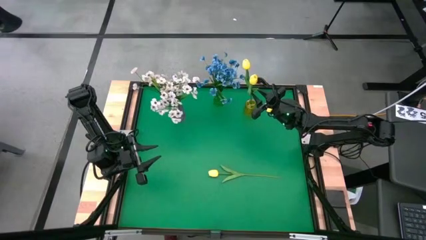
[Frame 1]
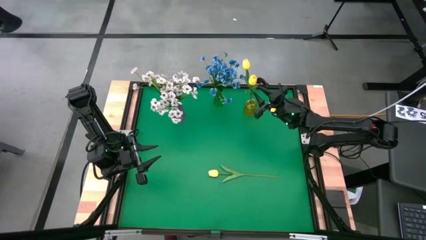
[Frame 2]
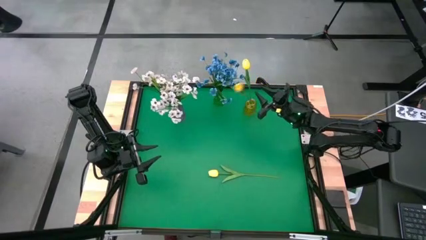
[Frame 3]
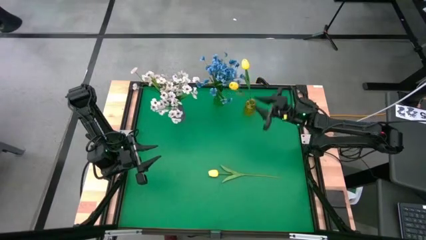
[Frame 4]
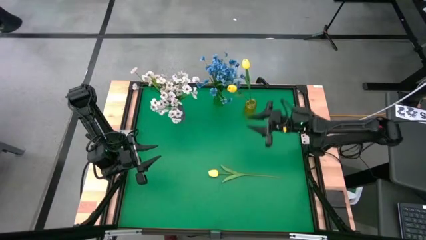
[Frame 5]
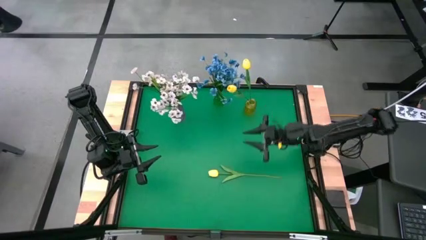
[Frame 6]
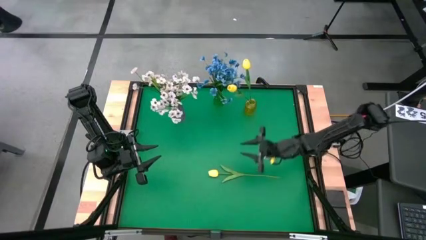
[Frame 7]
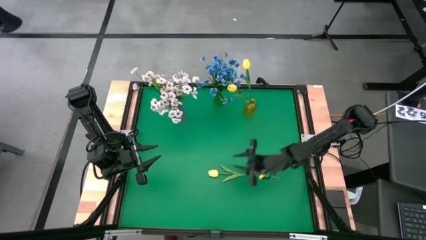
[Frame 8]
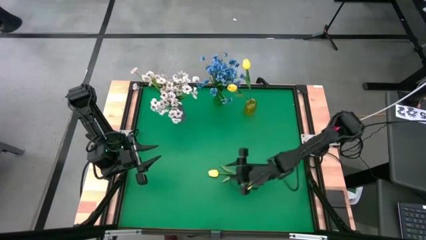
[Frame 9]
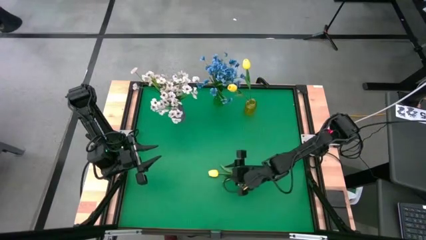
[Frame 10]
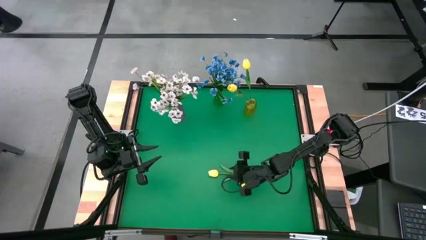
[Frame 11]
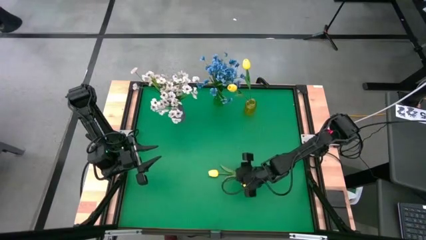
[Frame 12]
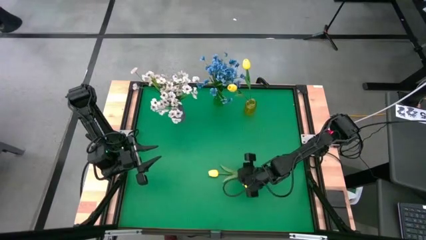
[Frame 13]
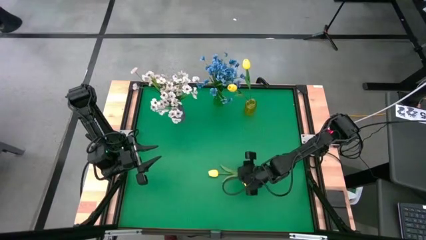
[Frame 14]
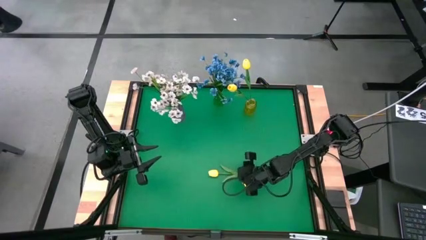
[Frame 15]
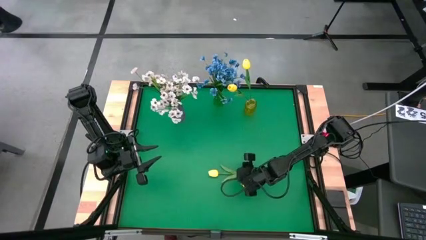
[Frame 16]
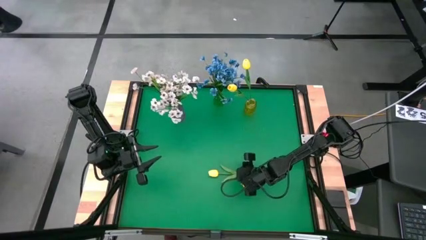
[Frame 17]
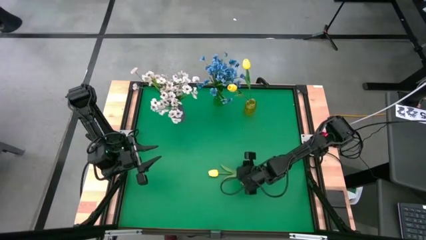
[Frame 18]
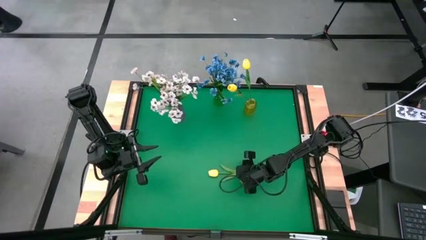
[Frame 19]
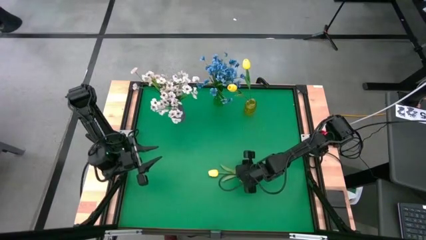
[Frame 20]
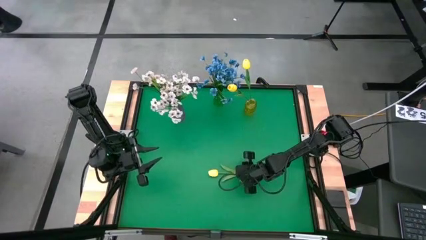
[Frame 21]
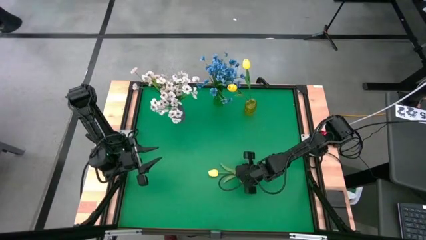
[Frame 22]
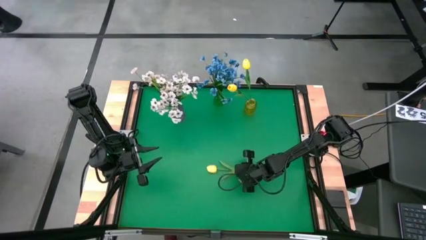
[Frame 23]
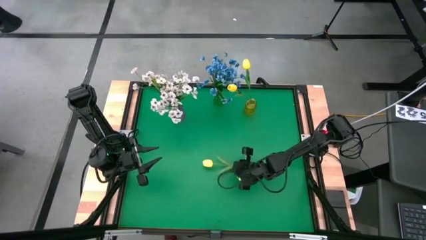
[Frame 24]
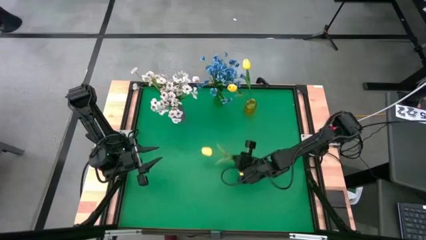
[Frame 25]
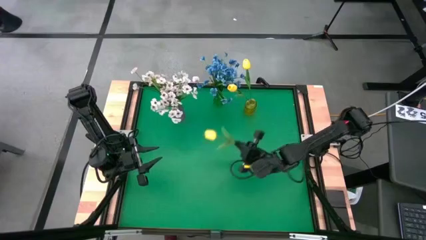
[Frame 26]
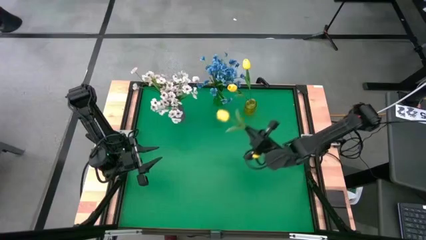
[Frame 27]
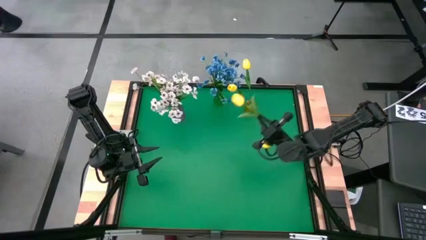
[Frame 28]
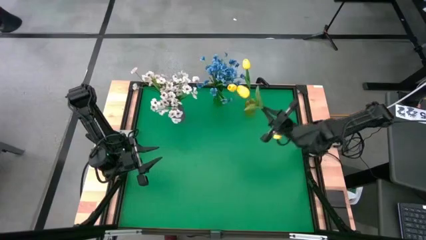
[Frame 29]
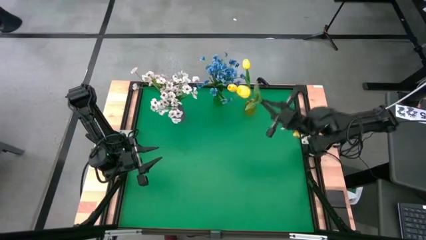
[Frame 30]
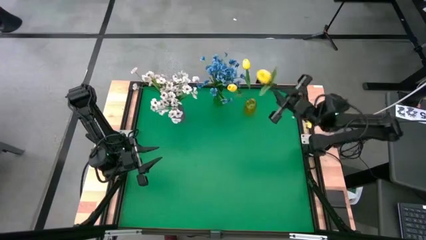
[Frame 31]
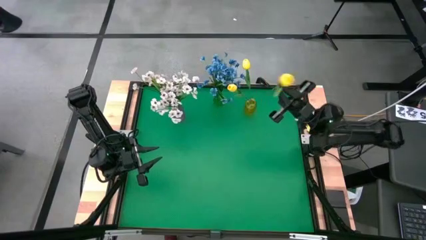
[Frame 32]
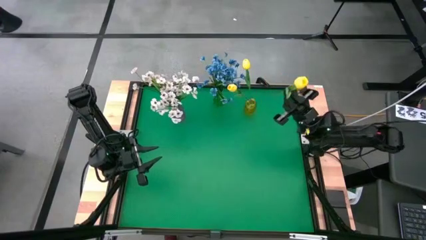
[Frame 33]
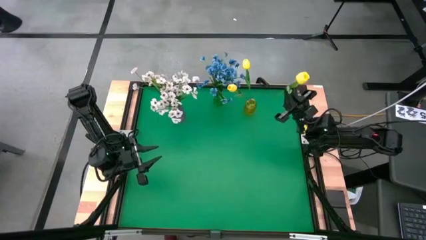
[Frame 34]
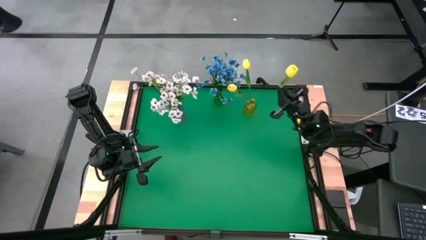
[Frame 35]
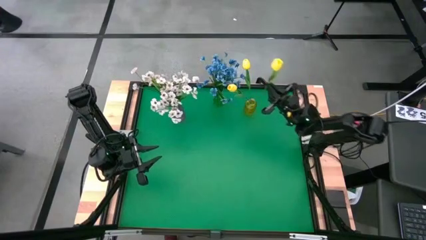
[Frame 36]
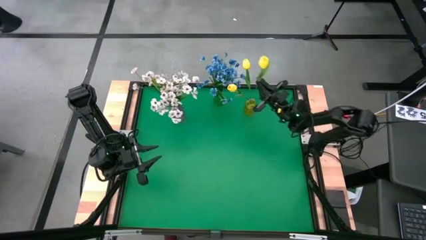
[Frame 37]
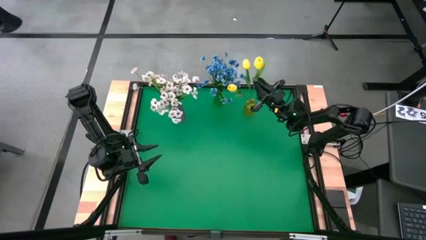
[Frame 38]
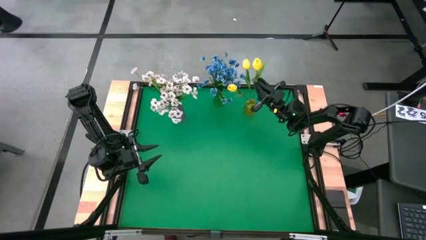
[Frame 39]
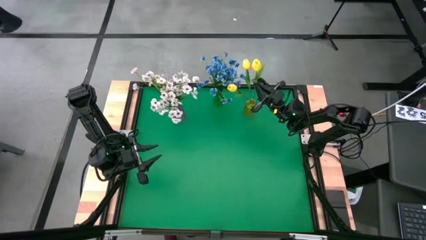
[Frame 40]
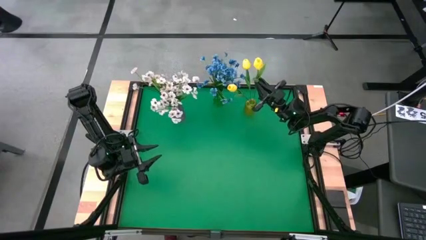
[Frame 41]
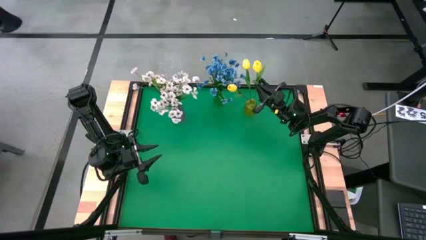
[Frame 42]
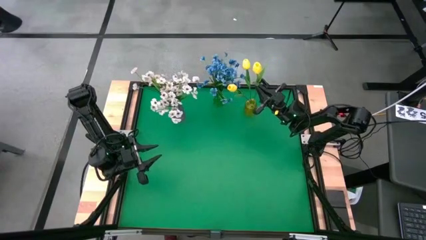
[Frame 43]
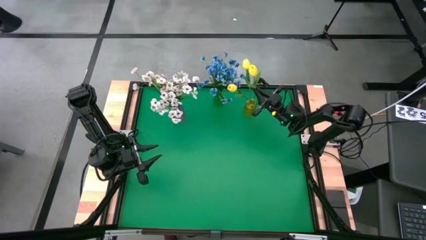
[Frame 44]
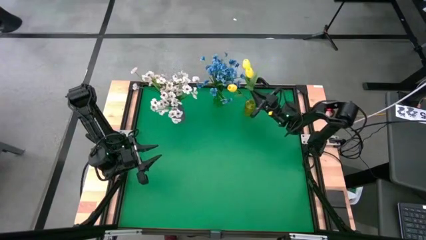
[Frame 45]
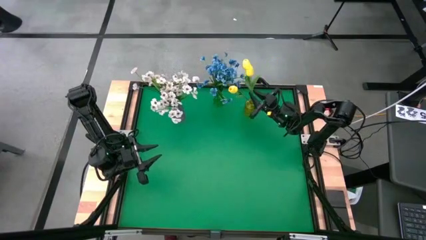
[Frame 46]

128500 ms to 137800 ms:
Task: Sort flowers into vase by color
Put the yellow flower into the yellow vase

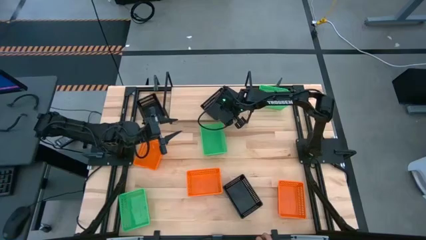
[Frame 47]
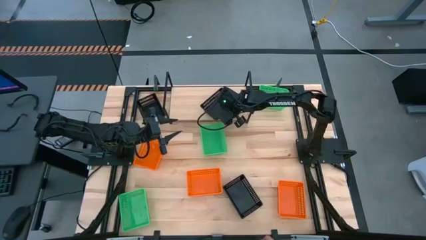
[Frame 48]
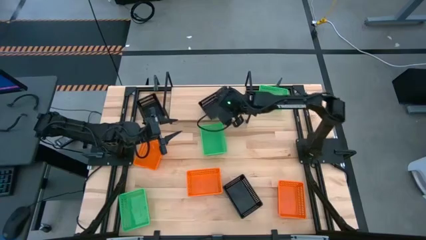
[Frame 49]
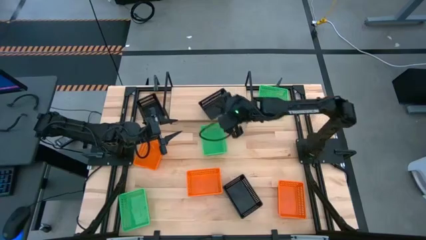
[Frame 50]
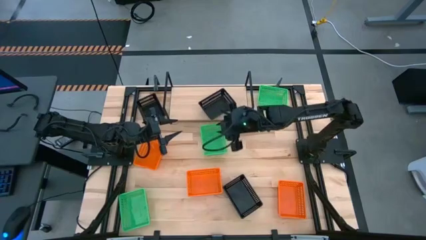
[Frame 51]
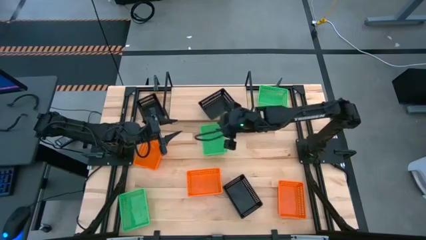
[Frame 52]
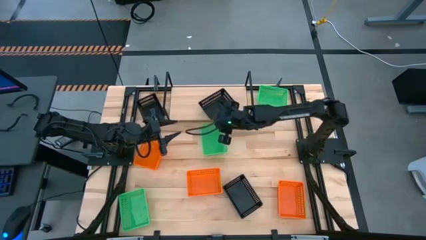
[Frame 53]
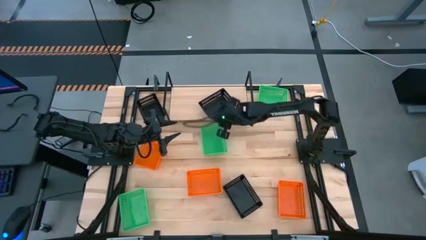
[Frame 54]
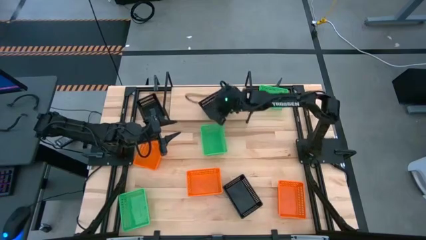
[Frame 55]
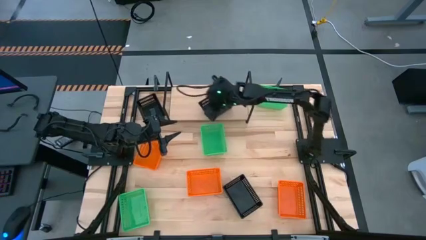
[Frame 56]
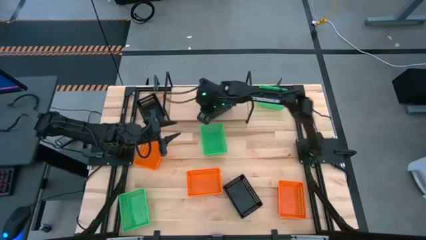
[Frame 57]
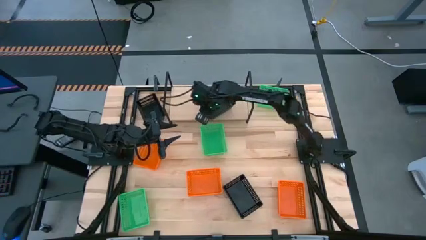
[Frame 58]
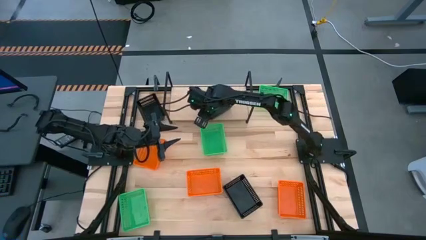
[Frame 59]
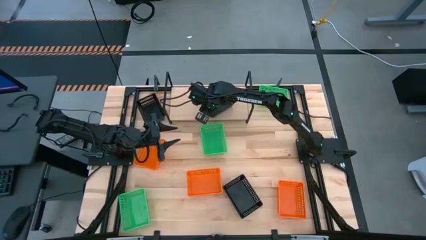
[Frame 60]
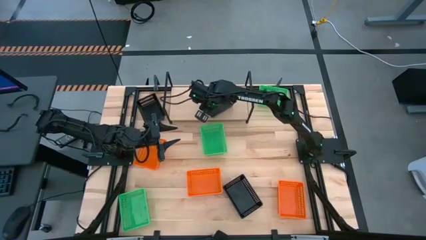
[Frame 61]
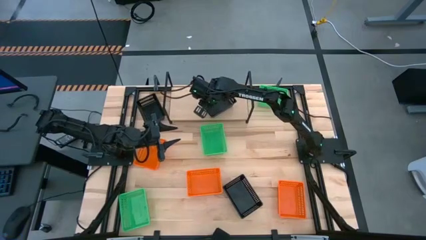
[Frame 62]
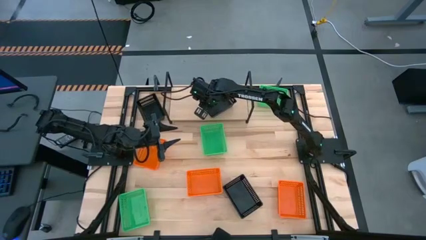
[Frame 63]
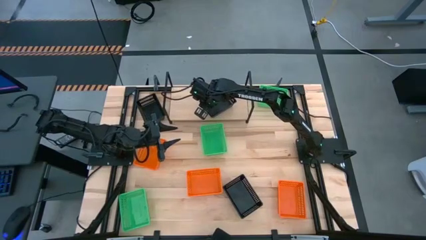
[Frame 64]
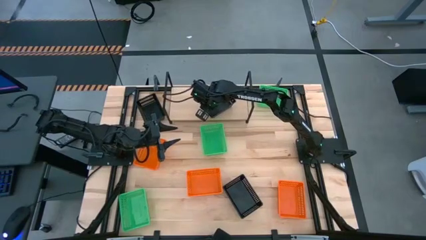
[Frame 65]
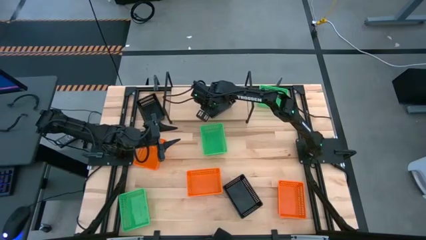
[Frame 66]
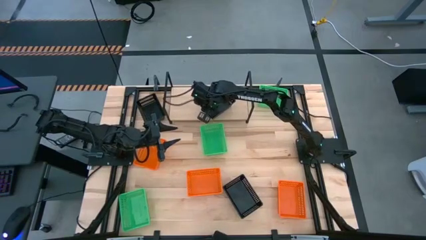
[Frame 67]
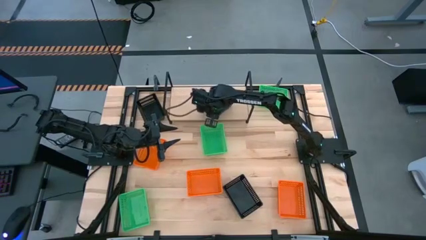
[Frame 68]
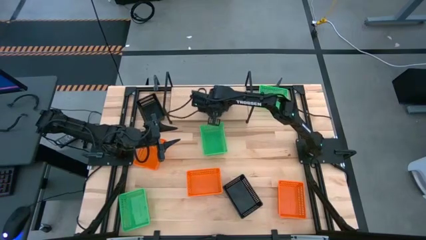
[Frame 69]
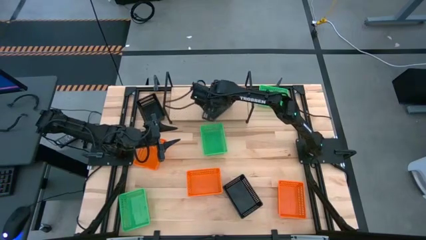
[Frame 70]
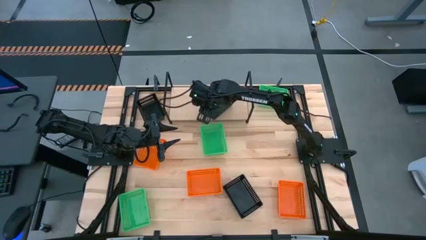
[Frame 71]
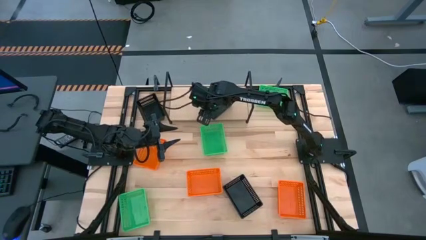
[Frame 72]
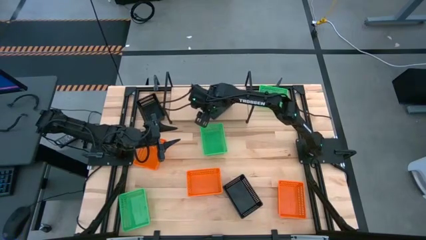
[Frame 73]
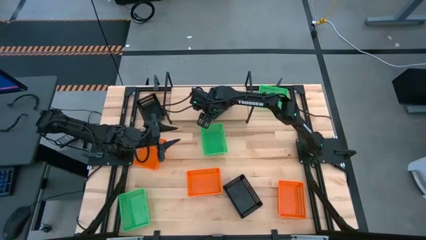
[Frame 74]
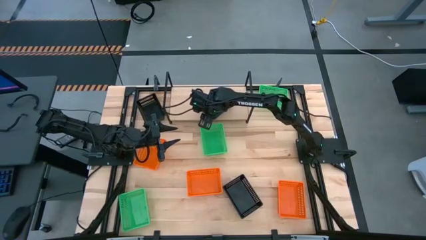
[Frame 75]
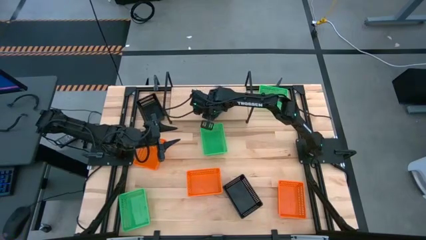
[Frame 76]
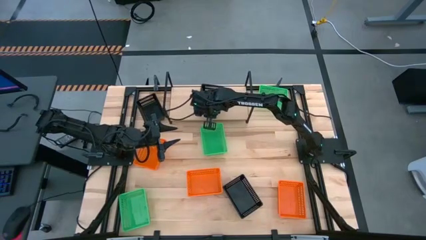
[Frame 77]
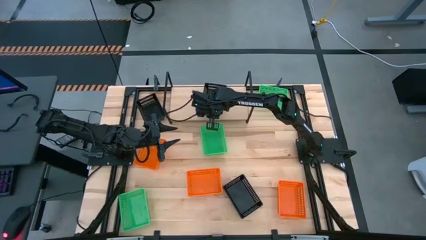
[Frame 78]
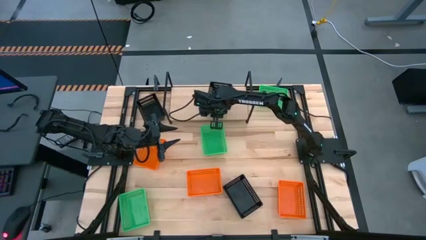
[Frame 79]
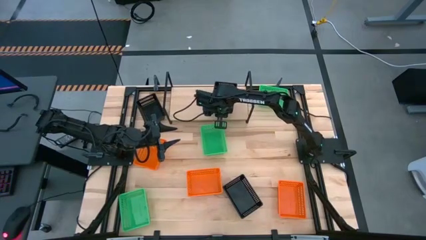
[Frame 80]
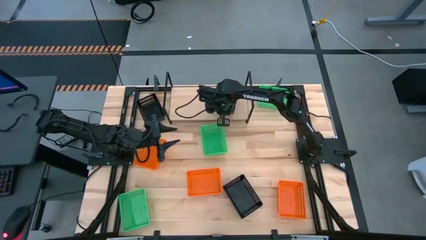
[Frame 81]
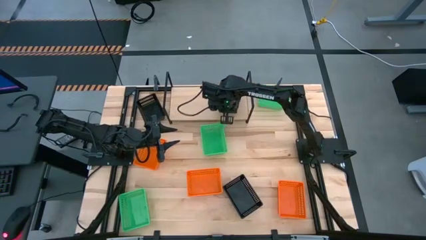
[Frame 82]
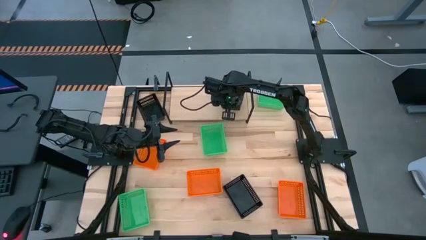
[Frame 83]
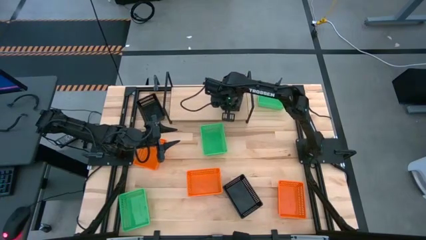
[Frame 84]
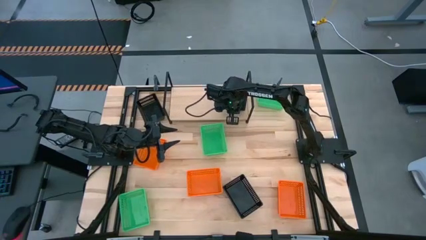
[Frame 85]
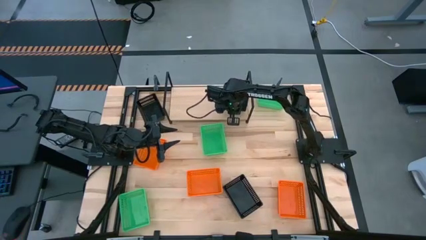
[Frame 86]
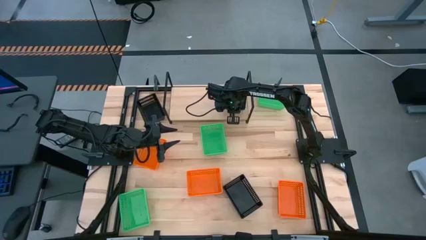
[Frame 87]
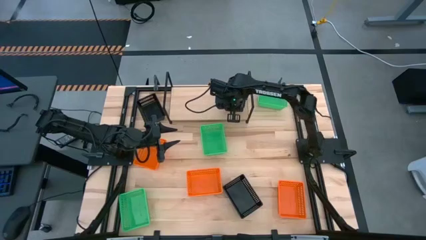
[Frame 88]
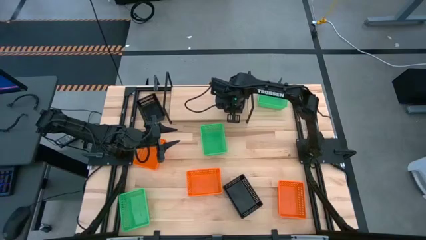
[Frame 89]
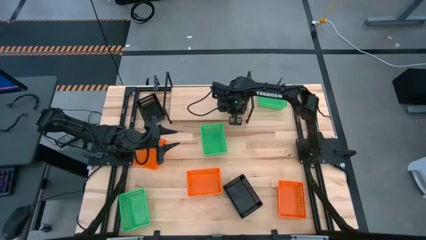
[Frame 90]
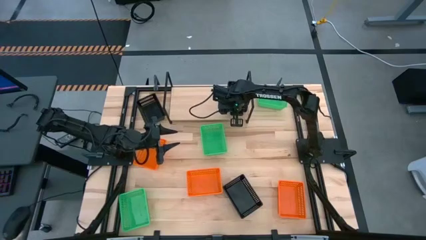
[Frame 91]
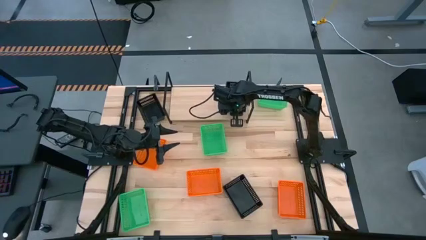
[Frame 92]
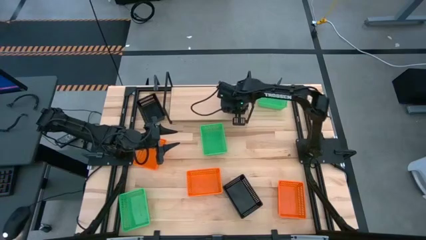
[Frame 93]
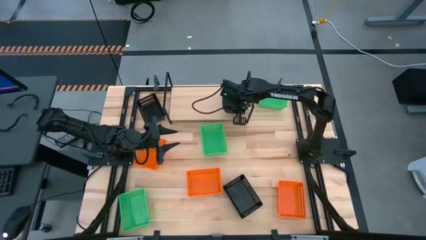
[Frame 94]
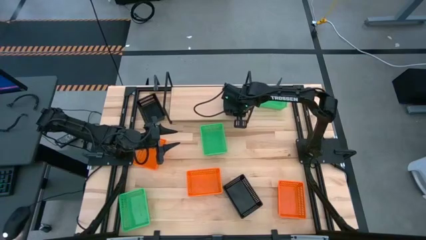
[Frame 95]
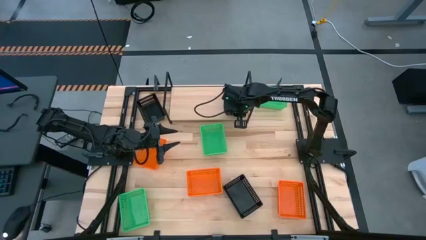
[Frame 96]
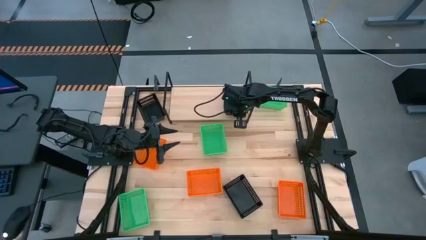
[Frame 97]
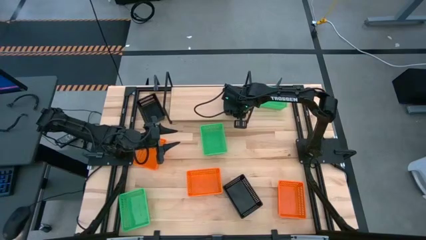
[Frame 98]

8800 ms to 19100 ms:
Task: Stack baskets on shelf by color
Adjust the black bin on the shelf
